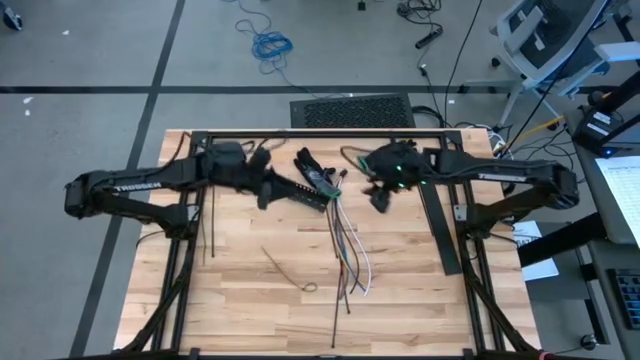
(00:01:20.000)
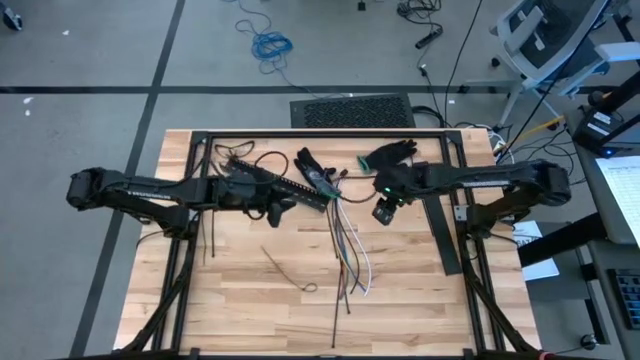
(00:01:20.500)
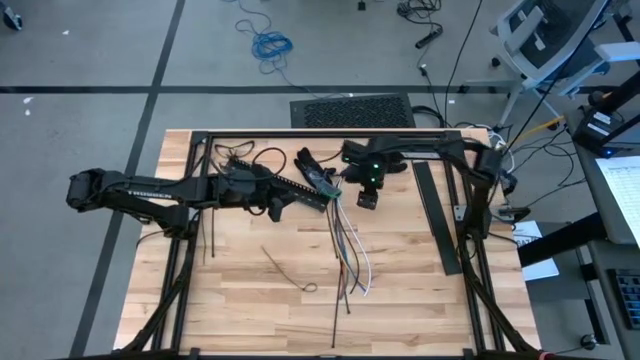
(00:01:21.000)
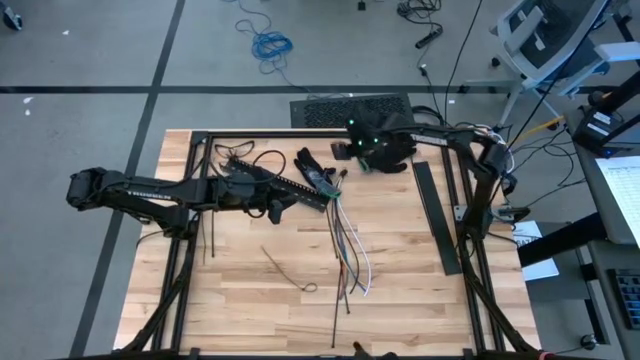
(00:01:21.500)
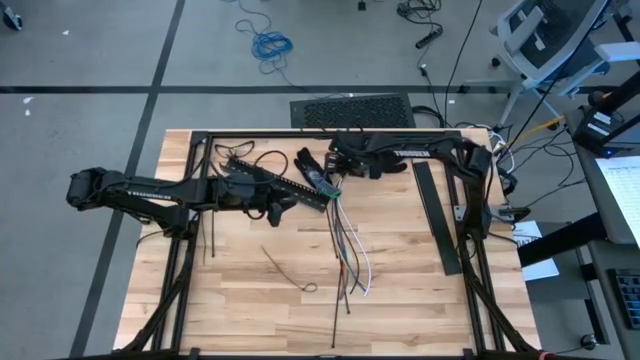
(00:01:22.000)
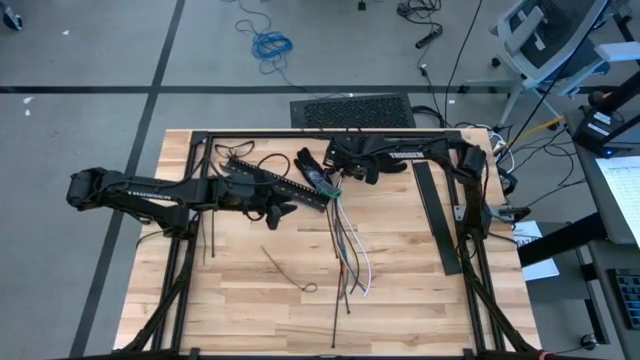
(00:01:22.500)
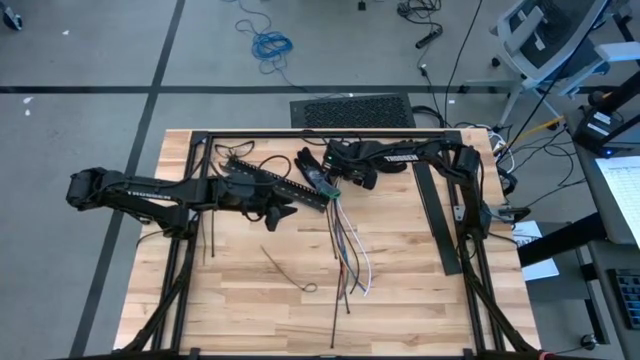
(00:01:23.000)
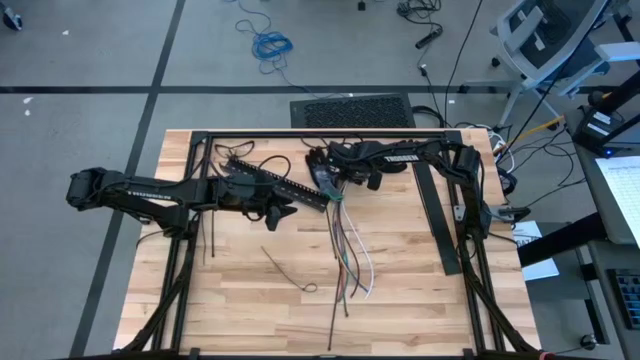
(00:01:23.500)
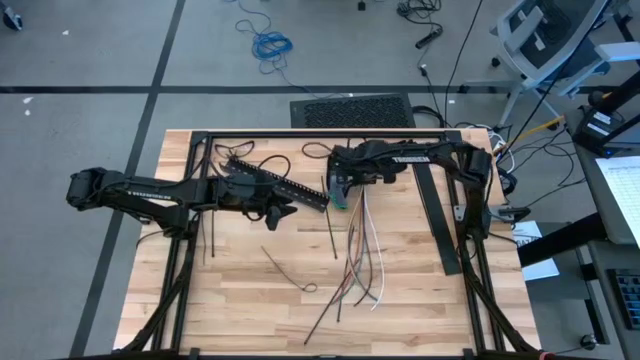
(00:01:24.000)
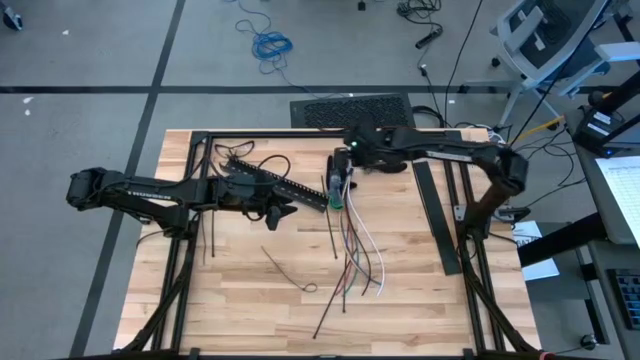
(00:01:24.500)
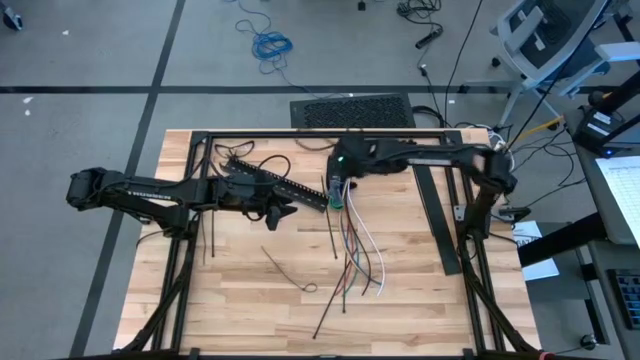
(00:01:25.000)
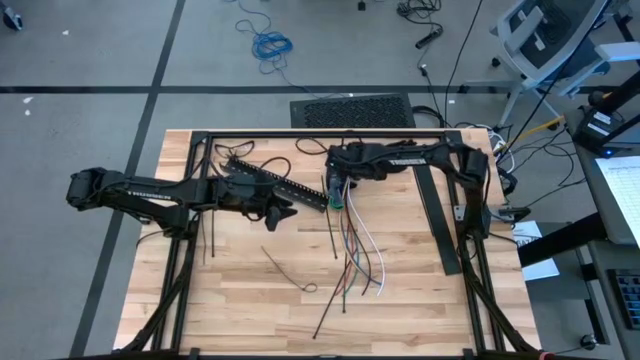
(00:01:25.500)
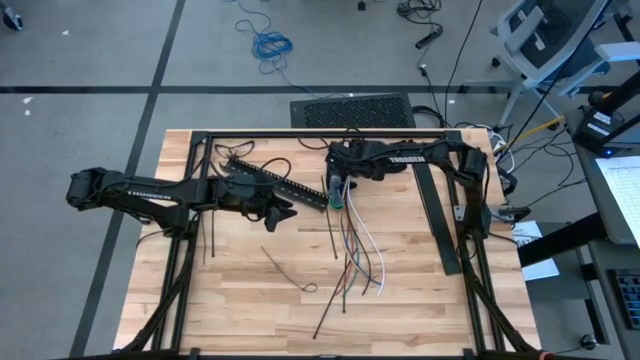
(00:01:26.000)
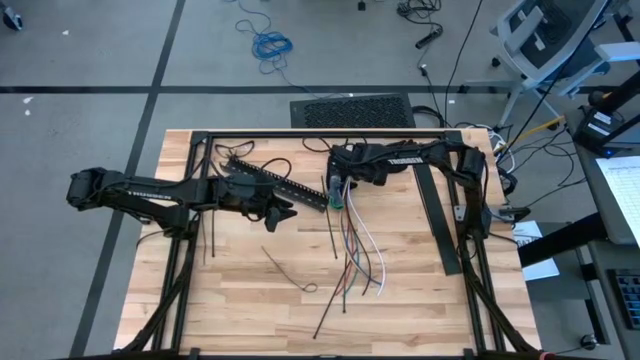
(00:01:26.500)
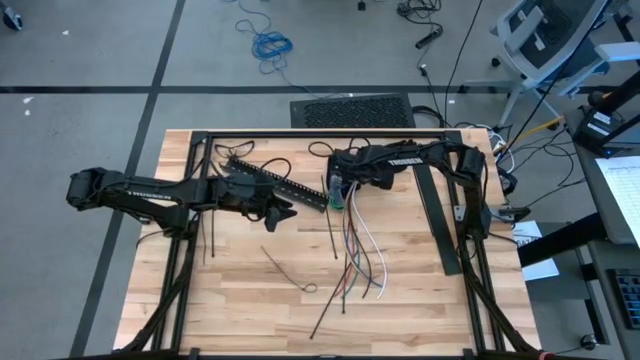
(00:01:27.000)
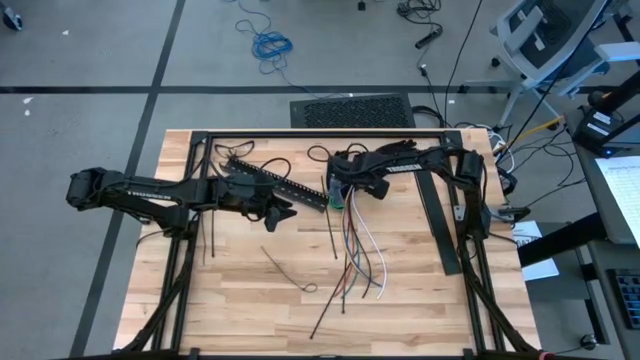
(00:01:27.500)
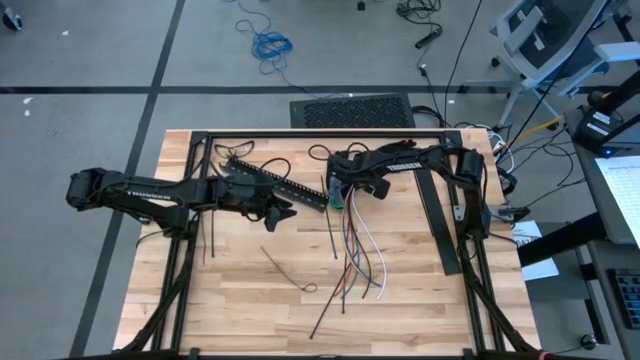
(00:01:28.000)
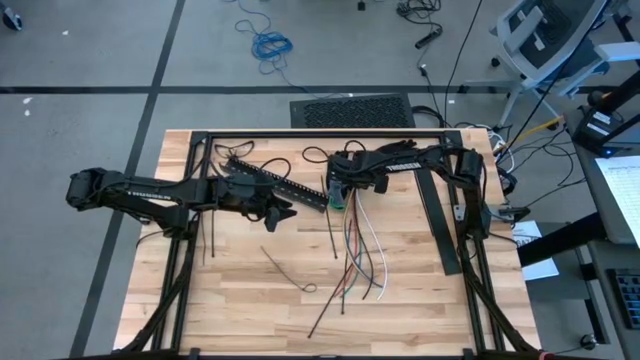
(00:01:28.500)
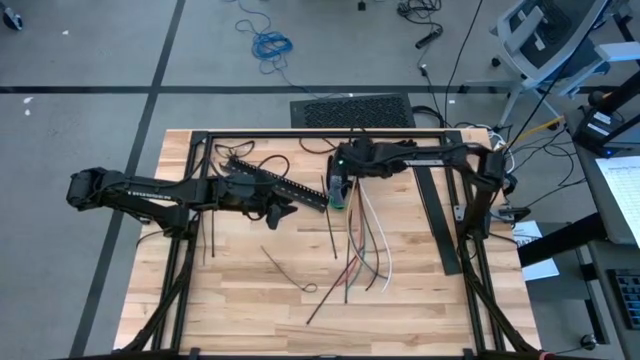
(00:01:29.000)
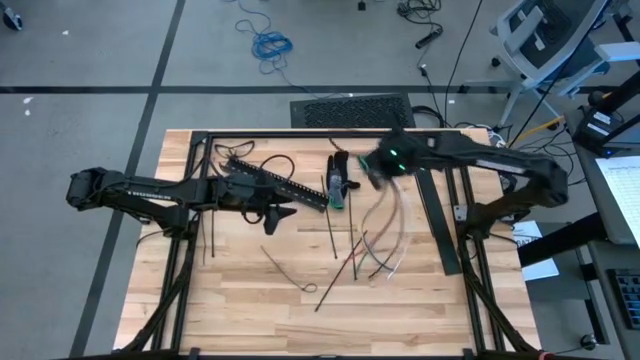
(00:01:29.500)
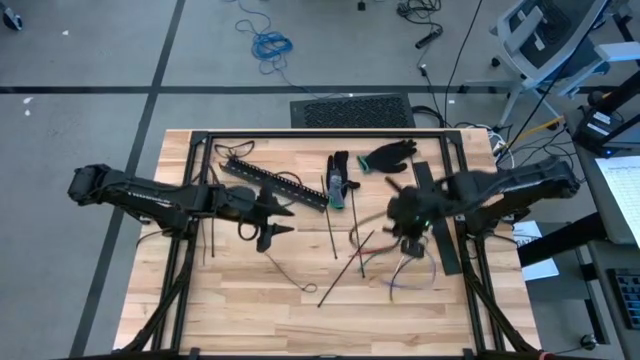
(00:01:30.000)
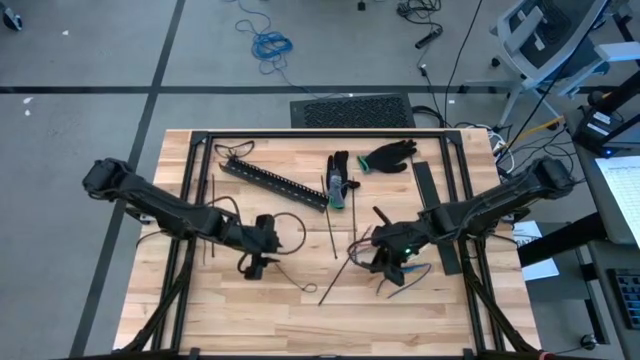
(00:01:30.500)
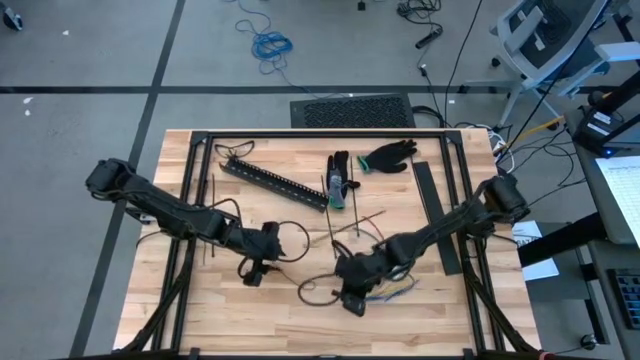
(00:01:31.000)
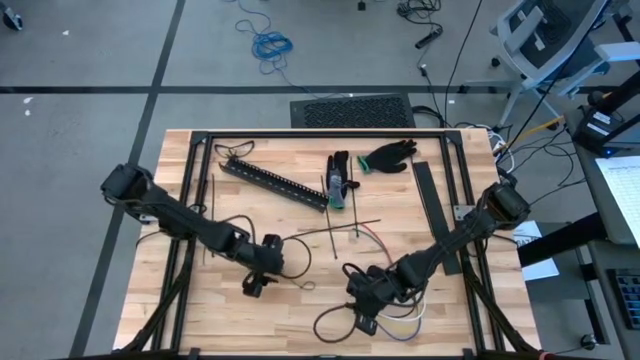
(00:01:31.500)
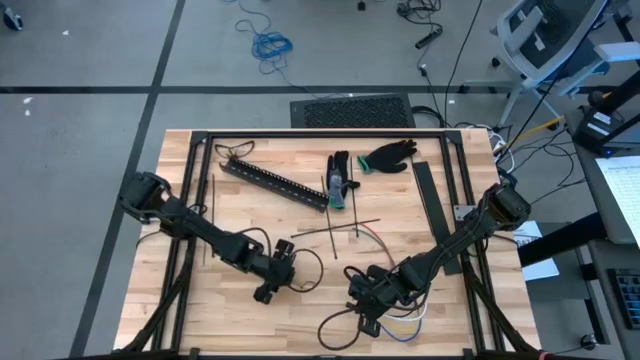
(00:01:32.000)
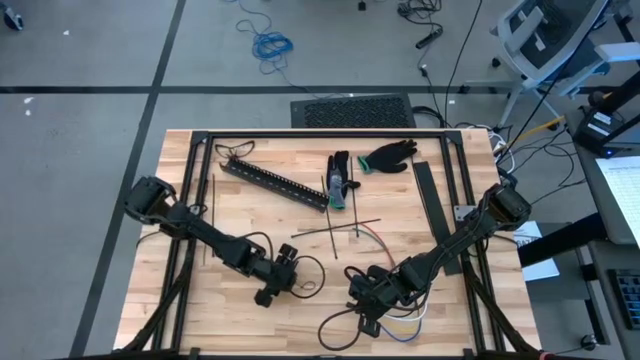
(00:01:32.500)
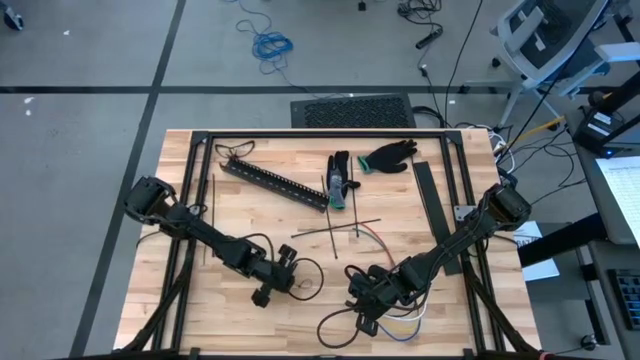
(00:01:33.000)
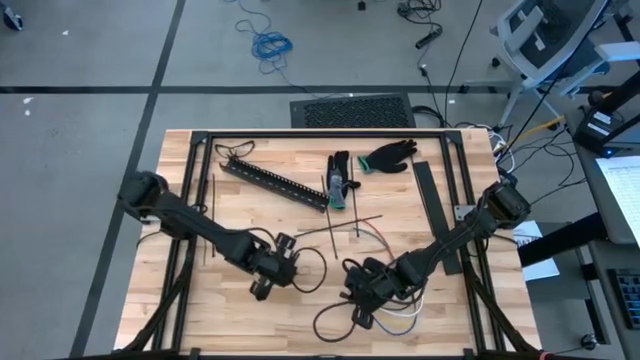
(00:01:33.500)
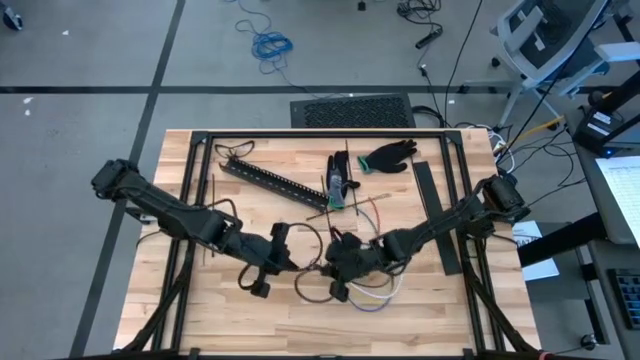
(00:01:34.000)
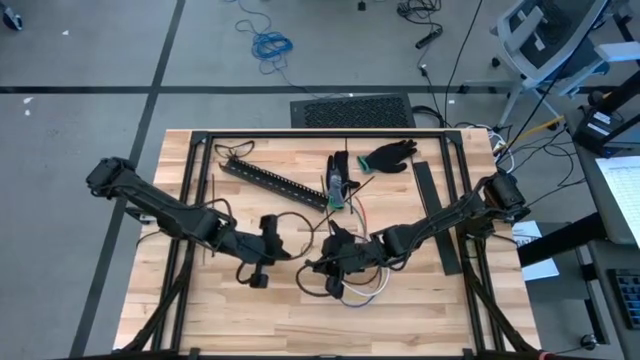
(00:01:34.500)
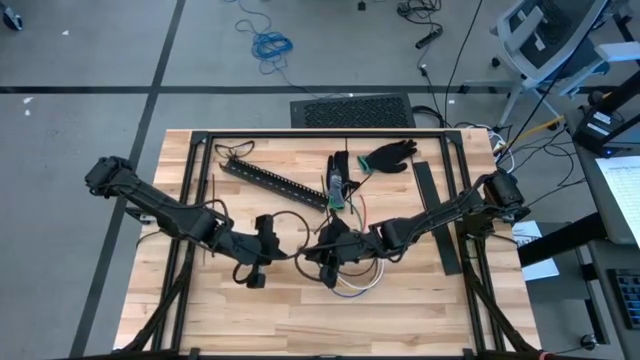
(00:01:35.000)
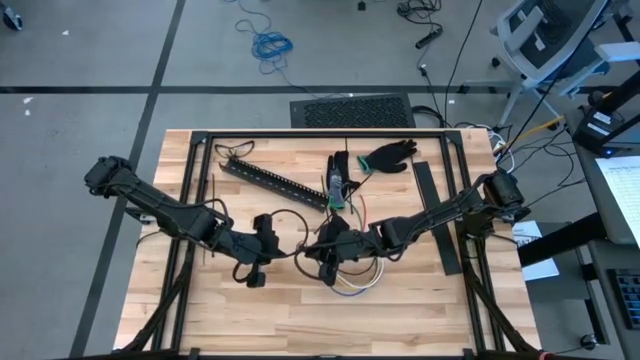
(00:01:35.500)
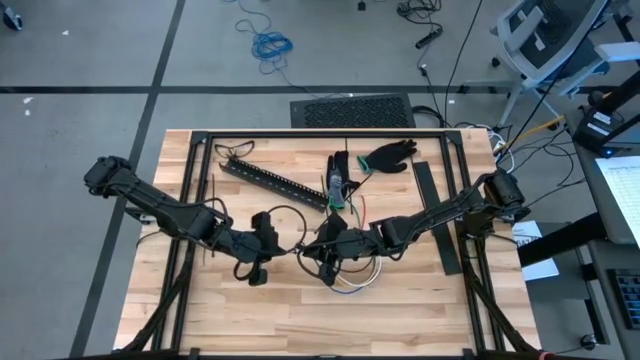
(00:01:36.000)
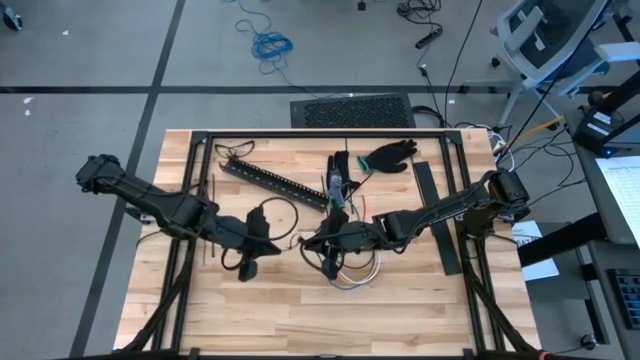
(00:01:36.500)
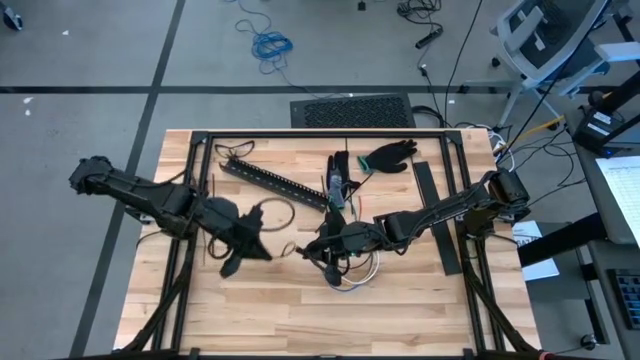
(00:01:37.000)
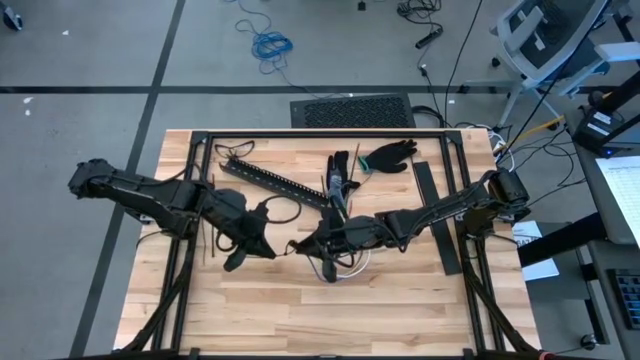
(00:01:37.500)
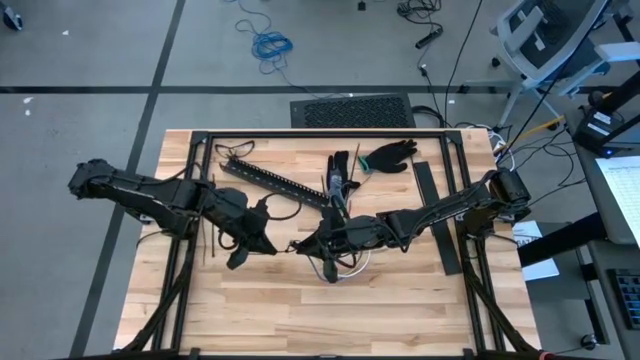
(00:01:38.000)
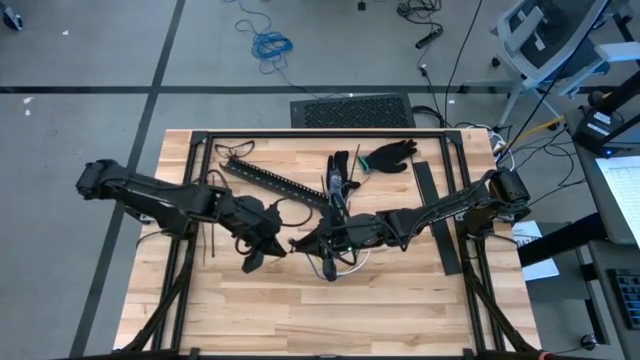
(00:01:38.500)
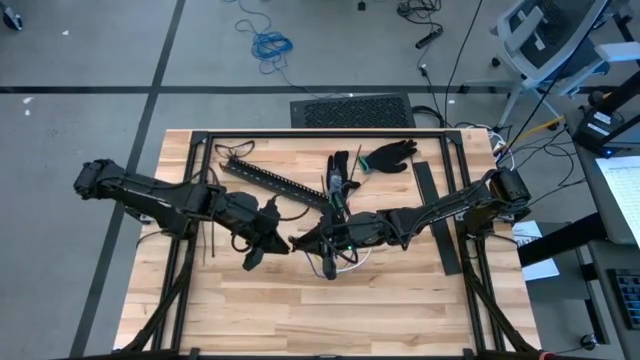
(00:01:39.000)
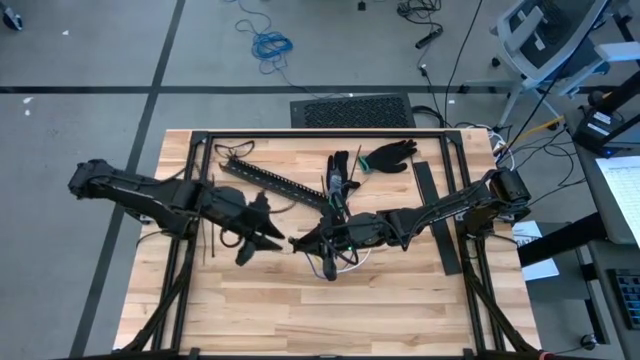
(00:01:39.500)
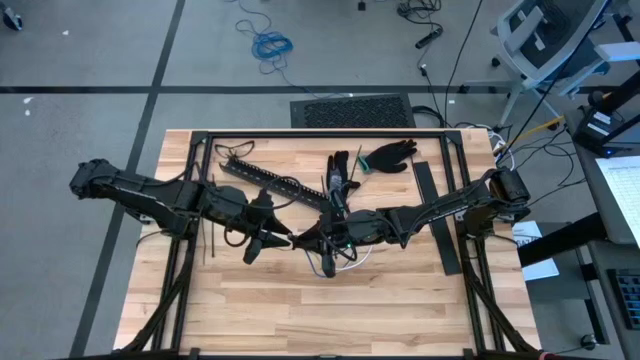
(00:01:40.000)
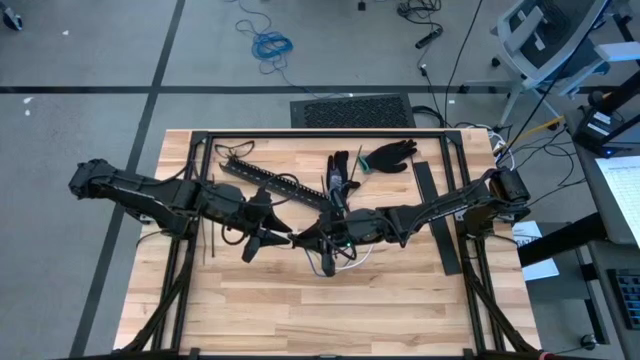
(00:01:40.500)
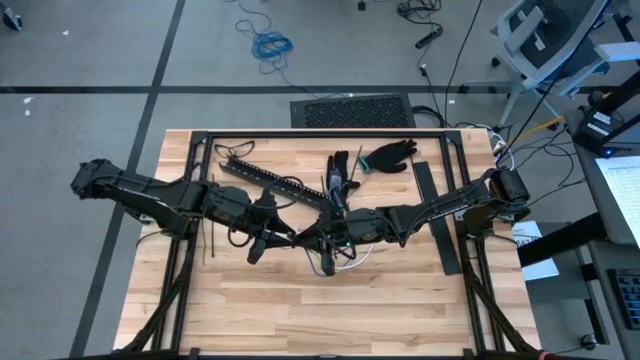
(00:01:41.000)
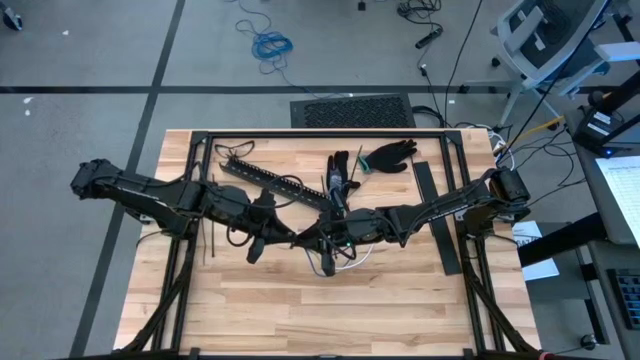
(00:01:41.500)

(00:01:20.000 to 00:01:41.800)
Task: Ziptie cables
Wrap the cable wires with the black zip tie
